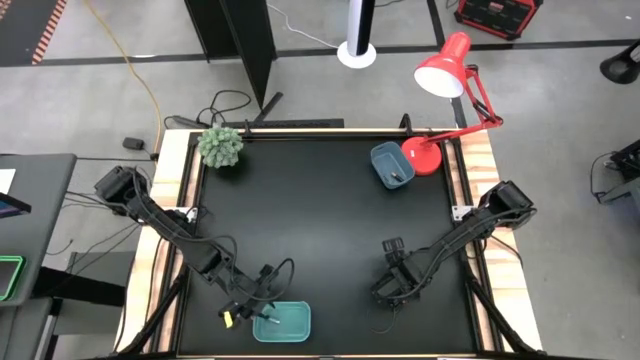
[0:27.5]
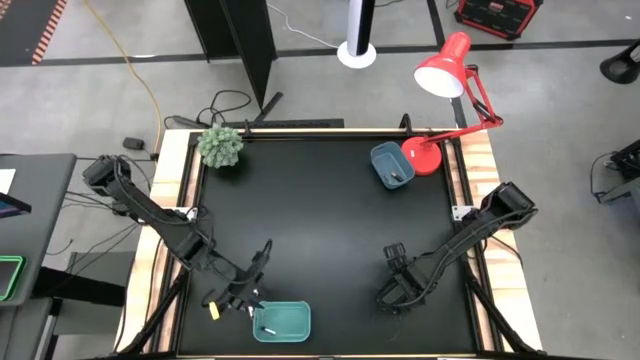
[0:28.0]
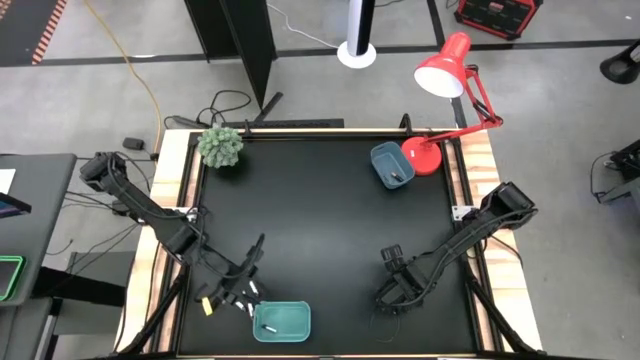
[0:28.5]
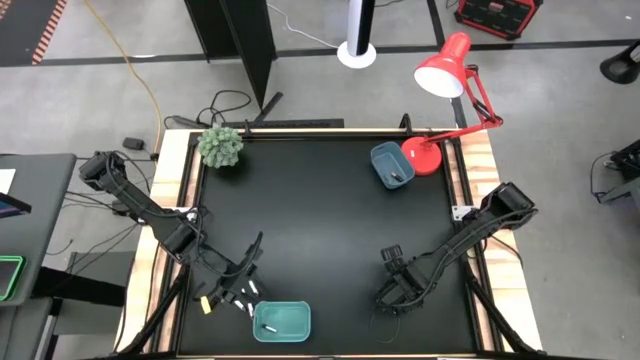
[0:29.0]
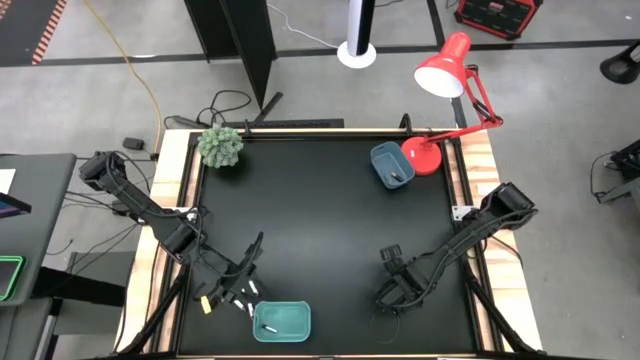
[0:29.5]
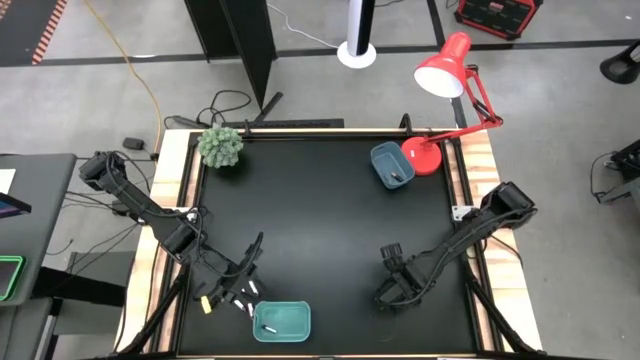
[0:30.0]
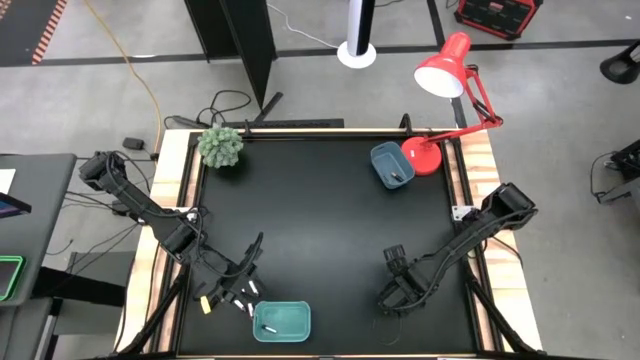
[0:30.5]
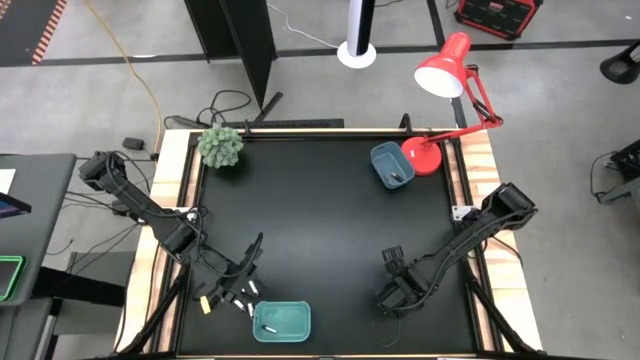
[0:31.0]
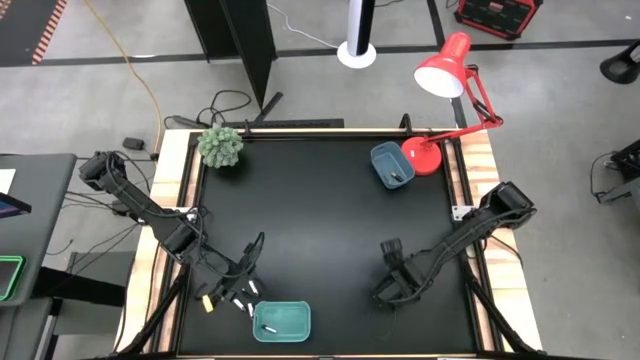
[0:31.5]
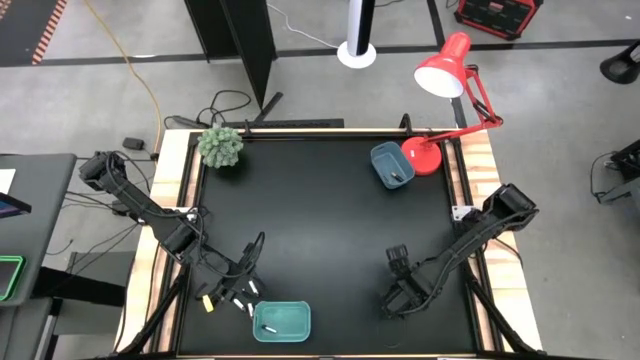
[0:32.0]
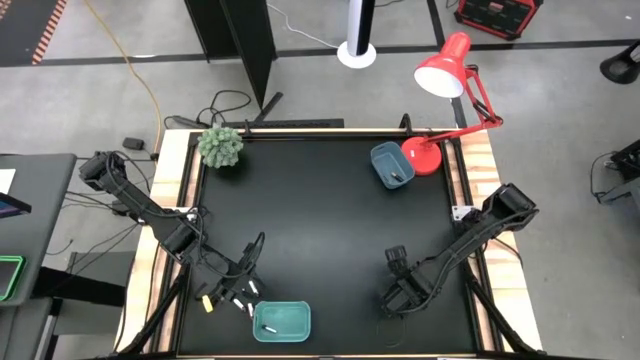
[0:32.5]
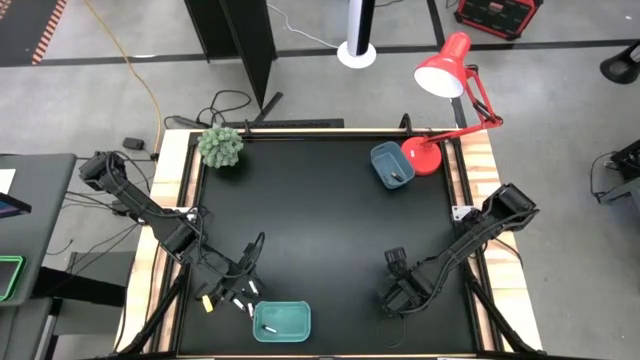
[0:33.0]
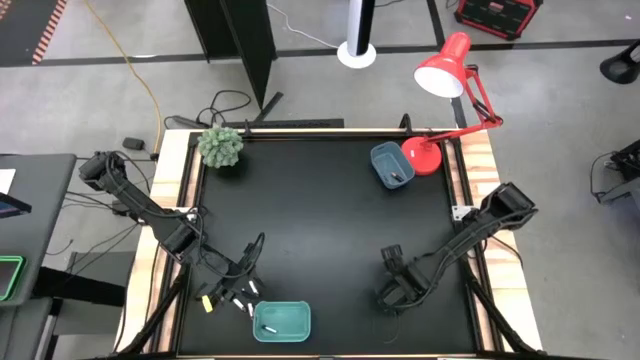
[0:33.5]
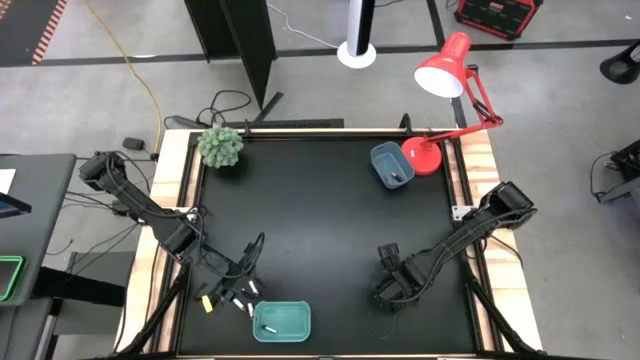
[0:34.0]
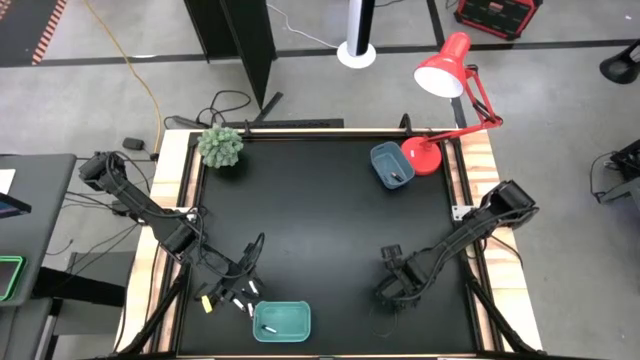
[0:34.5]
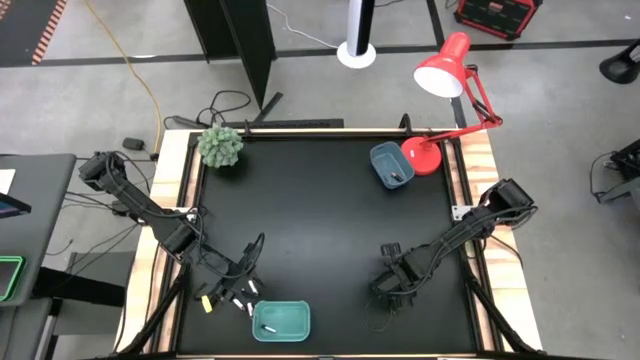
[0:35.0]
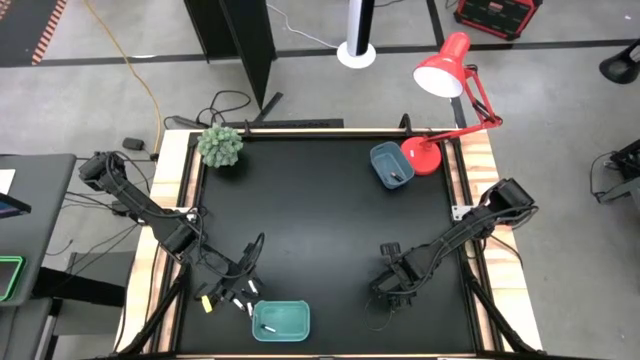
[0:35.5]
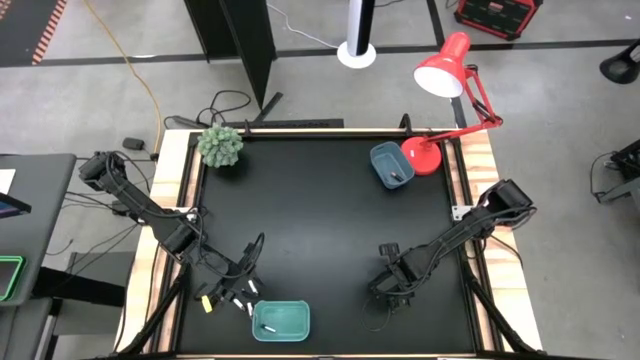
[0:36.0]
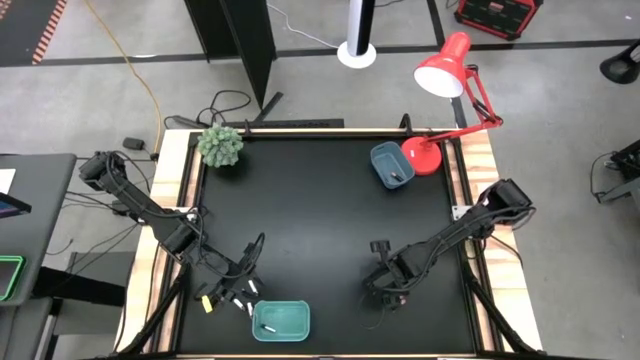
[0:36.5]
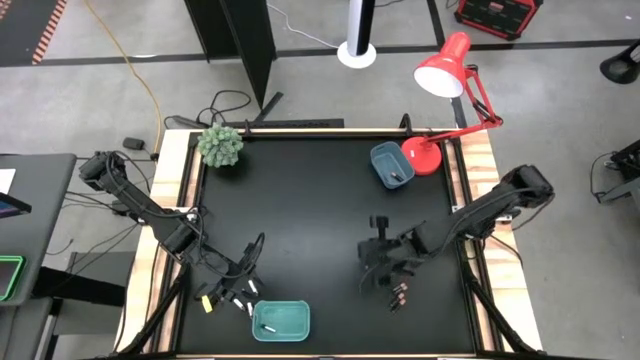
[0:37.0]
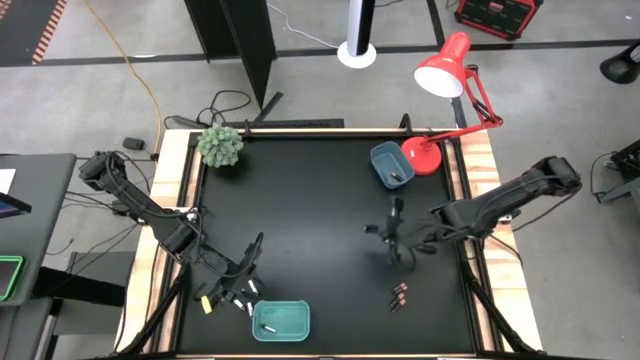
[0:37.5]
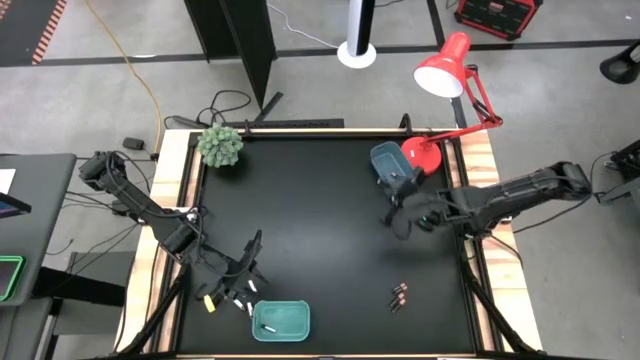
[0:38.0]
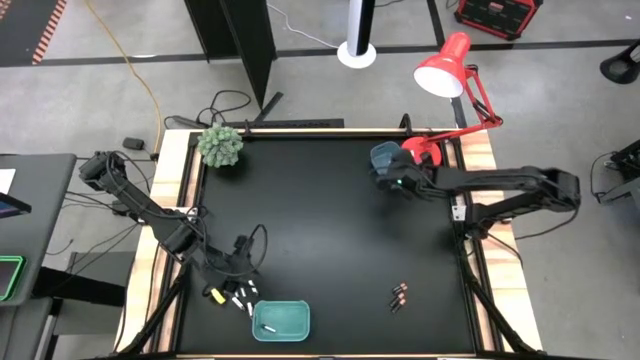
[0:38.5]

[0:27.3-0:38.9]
Task: Sort batteries
Put the black battery into the blue bin

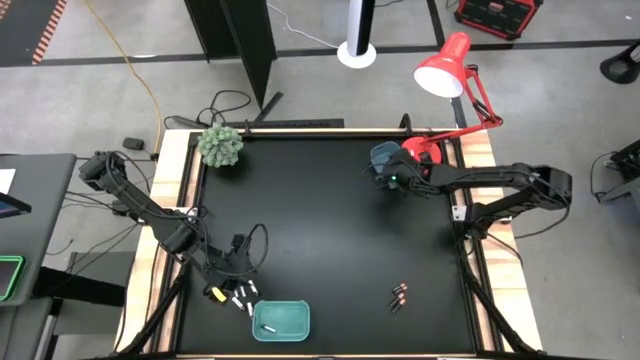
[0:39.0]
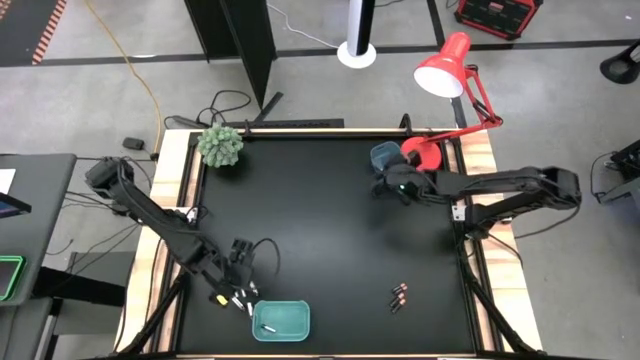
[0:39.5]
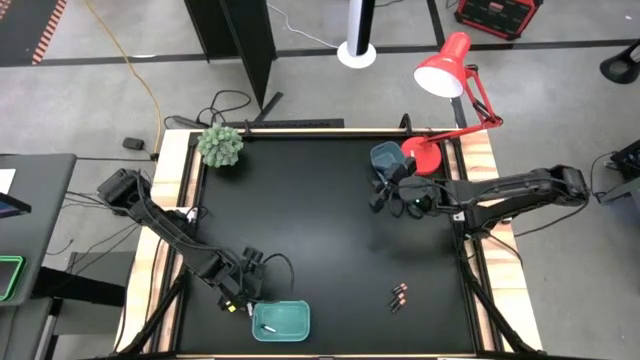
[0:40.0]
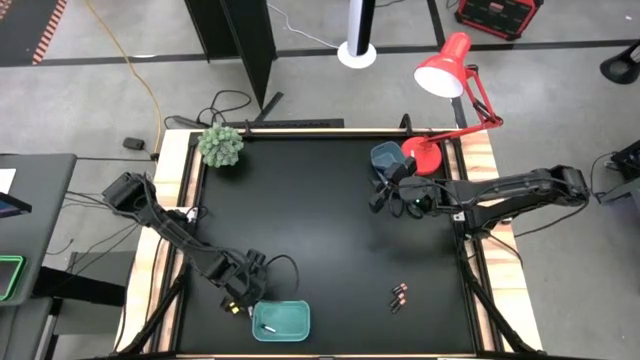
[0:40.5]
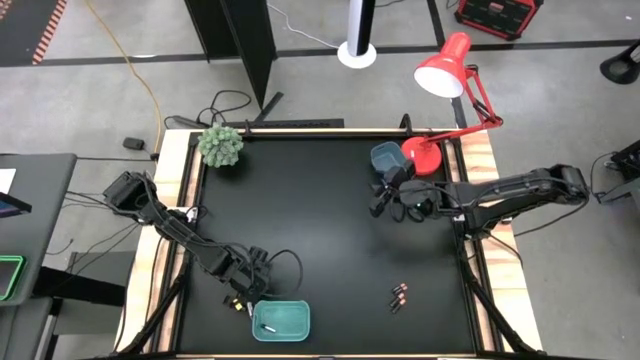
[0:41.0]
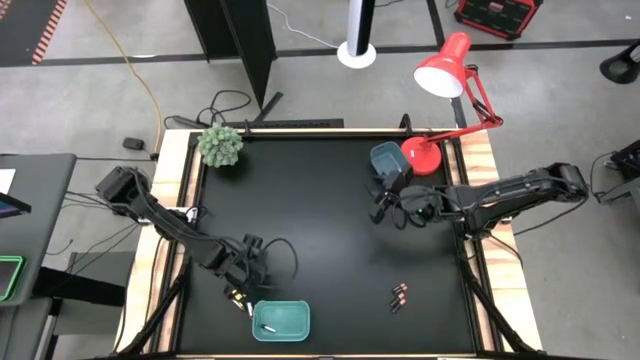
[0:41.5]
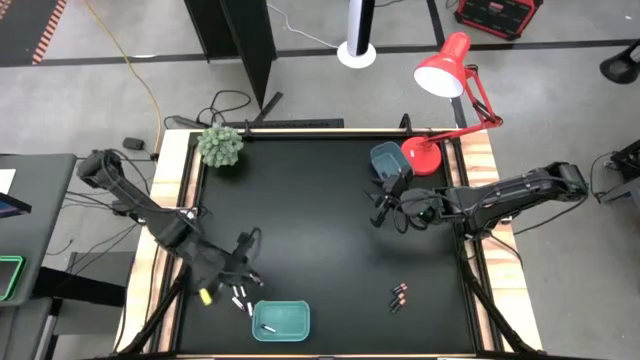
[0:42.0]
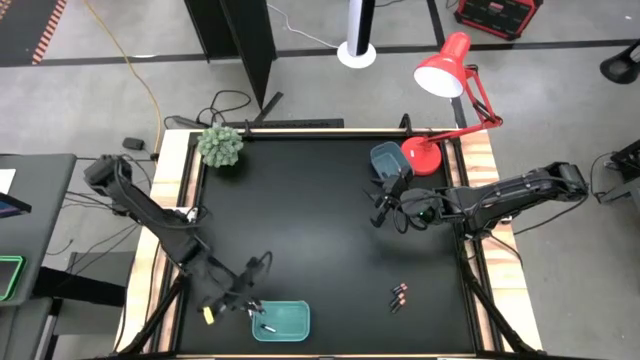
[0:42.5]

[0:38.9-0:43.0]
Put the silver battery into the green bin

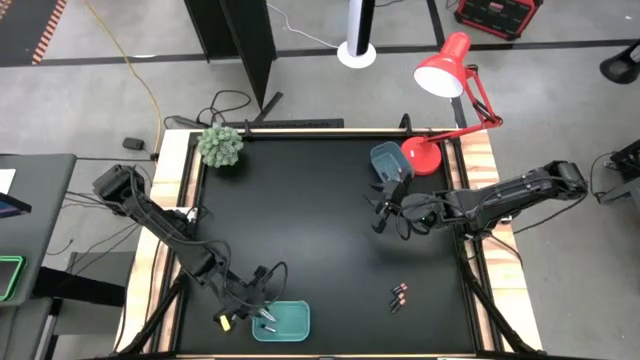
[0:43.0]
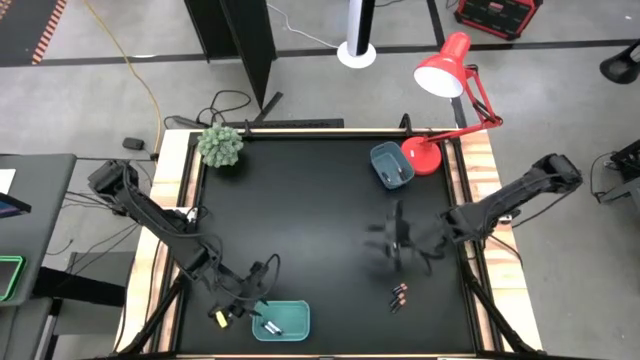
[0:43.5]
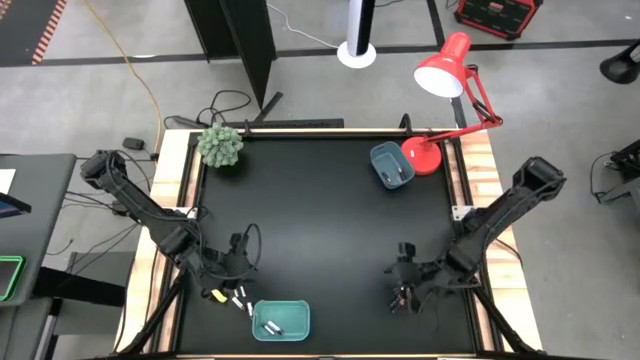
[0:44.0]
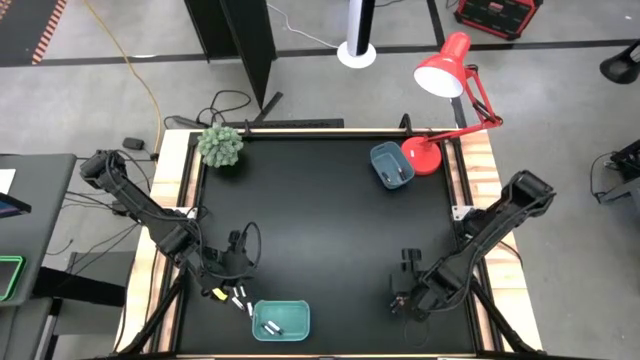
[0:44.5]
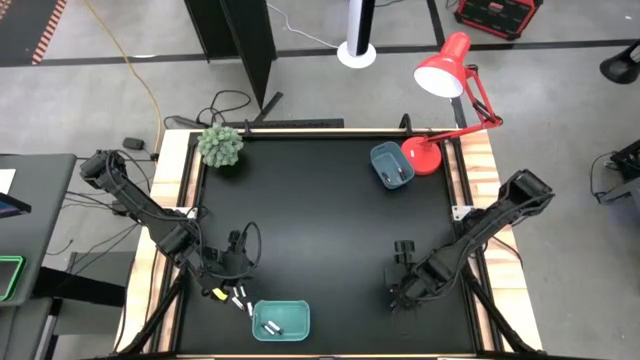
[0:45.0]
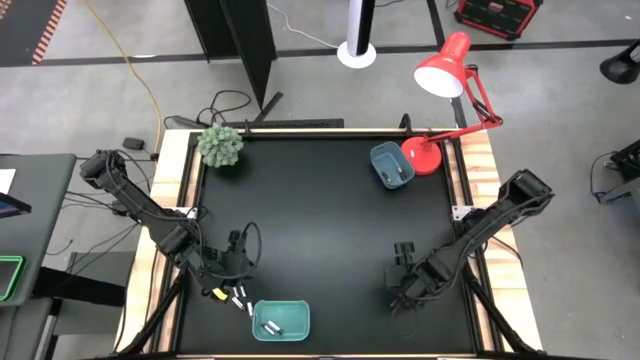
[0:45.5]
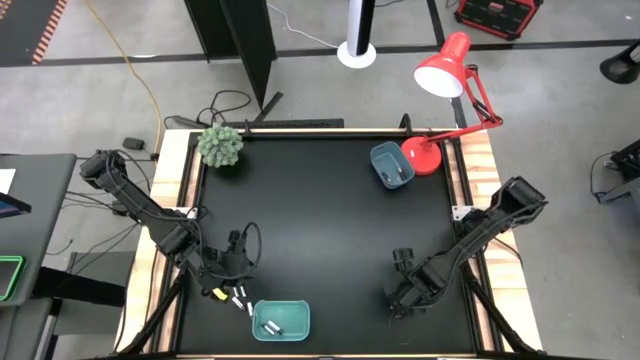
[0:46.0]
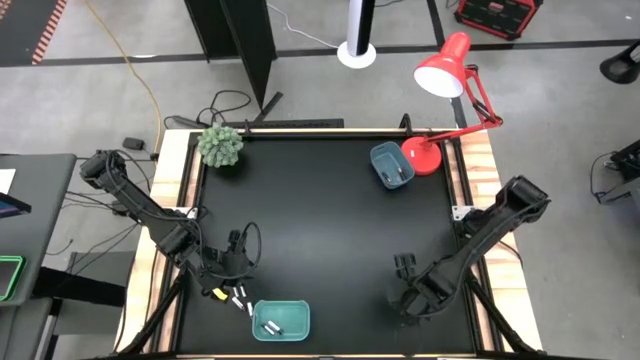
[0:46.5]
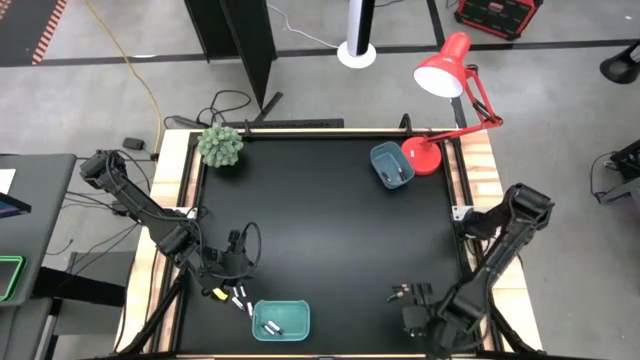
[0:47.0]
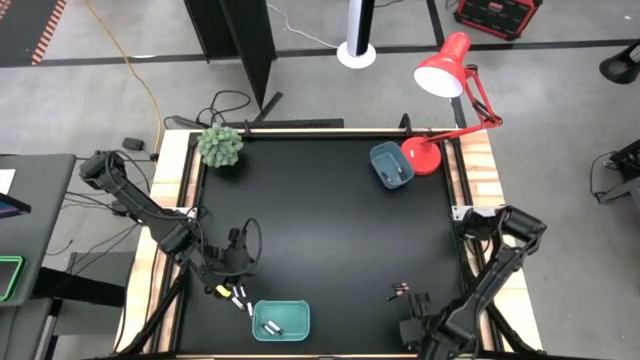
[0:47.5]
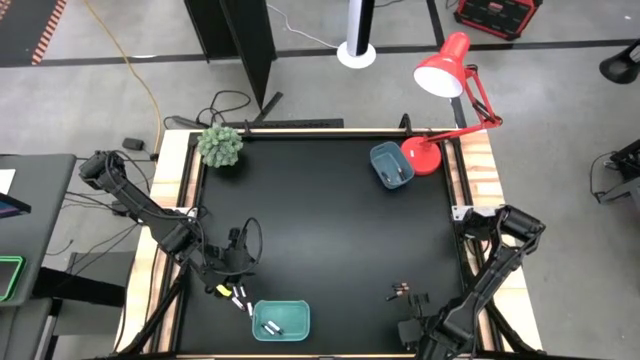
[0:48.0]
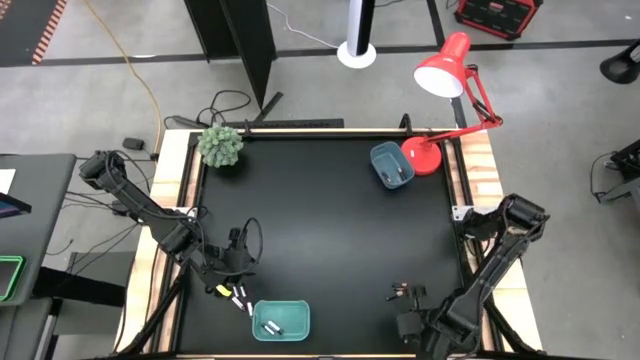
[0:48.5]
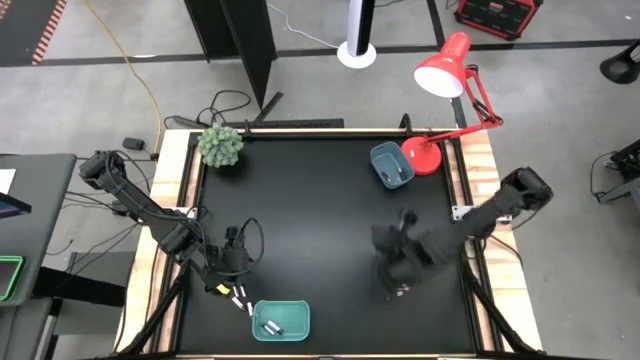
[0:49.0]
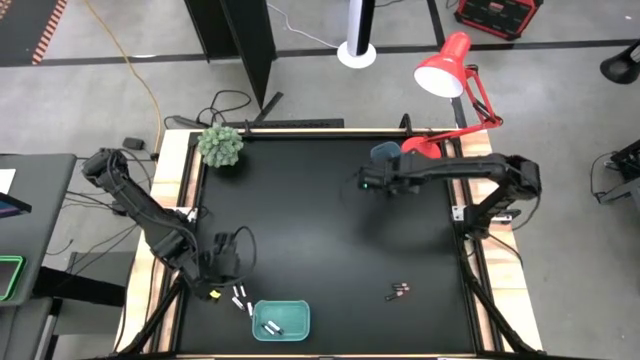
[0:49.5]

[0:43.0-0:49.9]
Put the black battery into the blue bin
